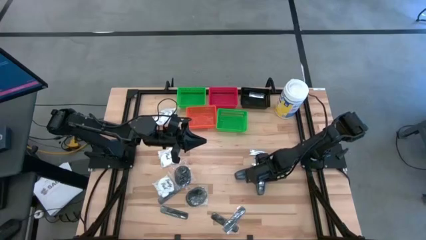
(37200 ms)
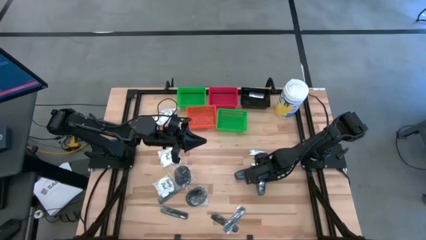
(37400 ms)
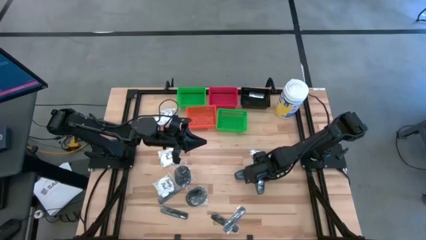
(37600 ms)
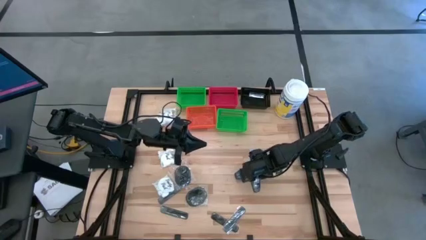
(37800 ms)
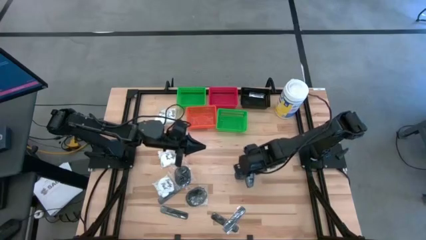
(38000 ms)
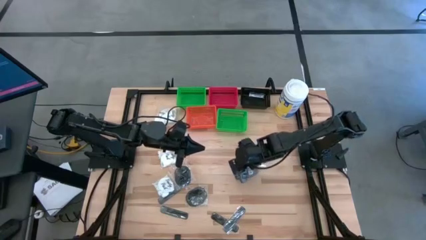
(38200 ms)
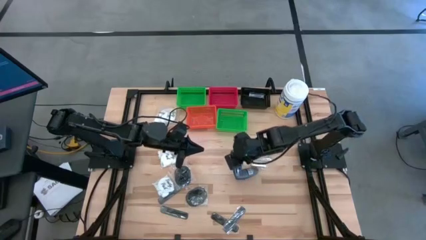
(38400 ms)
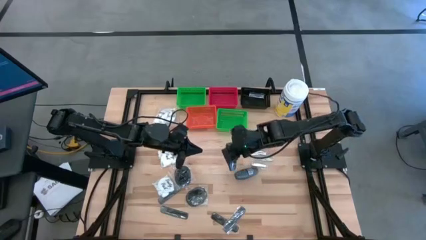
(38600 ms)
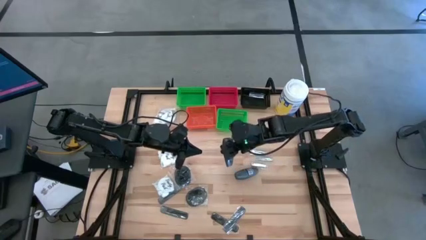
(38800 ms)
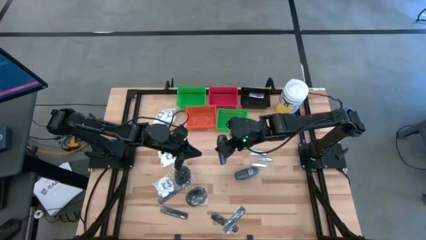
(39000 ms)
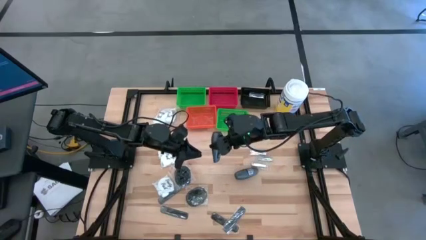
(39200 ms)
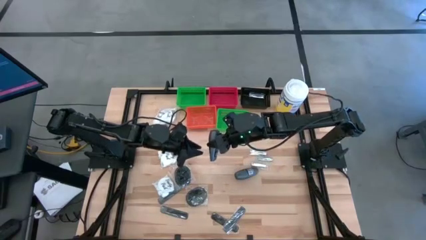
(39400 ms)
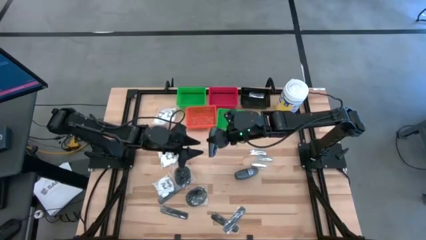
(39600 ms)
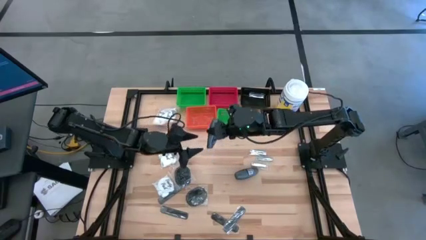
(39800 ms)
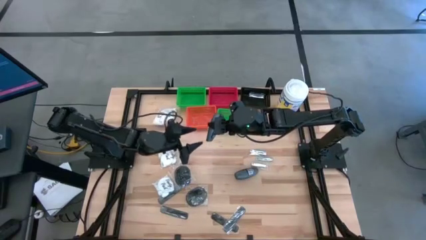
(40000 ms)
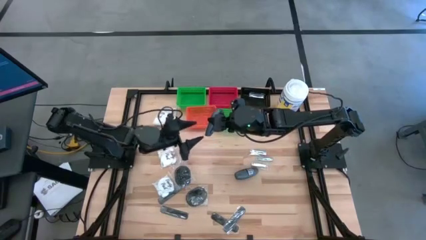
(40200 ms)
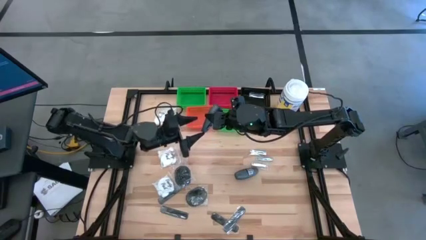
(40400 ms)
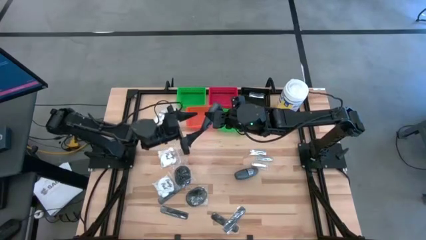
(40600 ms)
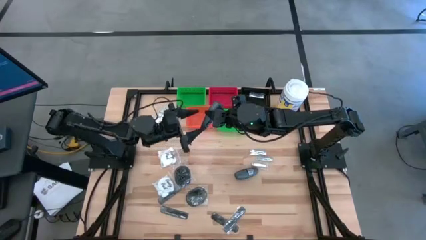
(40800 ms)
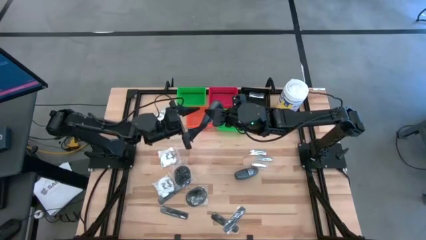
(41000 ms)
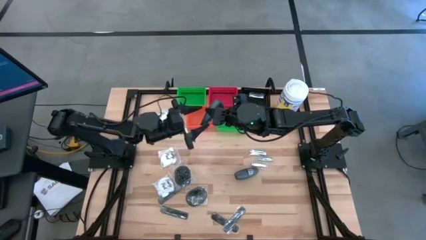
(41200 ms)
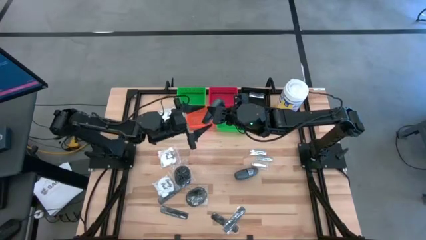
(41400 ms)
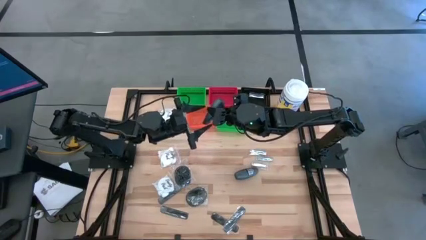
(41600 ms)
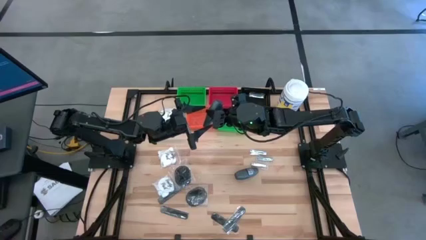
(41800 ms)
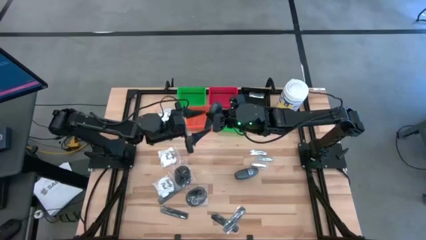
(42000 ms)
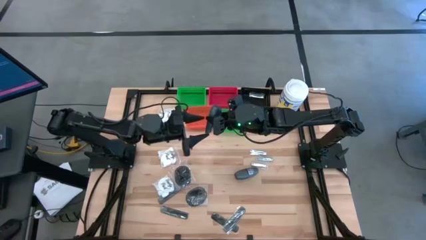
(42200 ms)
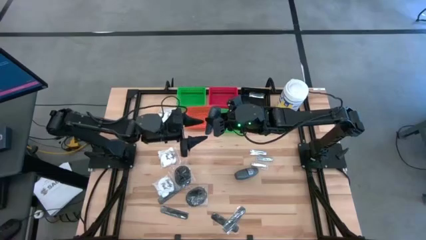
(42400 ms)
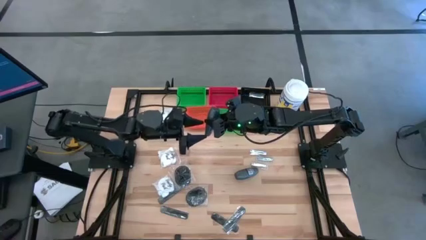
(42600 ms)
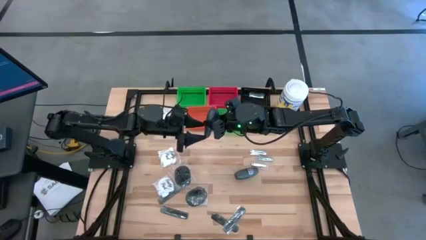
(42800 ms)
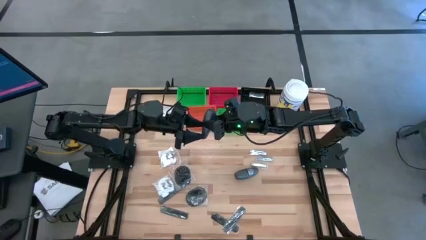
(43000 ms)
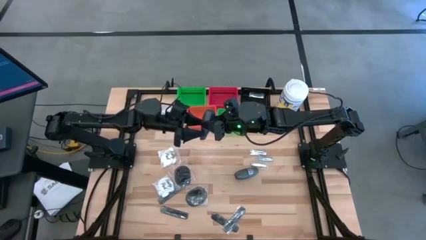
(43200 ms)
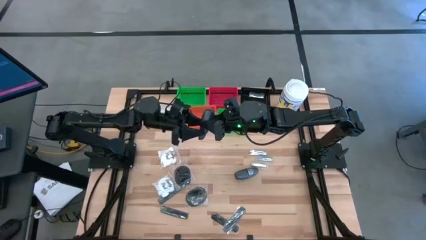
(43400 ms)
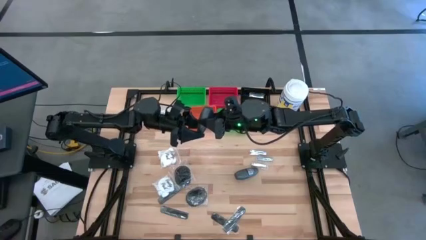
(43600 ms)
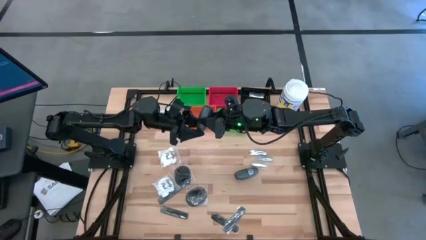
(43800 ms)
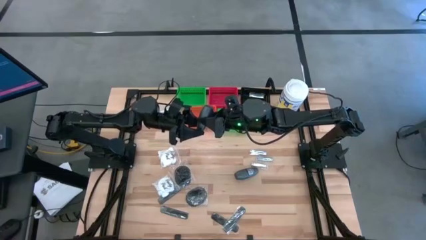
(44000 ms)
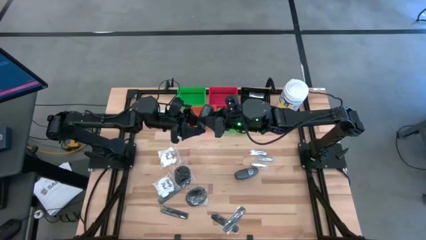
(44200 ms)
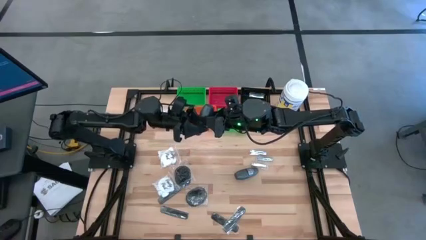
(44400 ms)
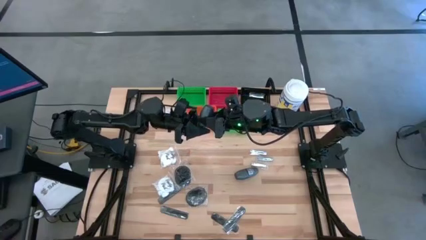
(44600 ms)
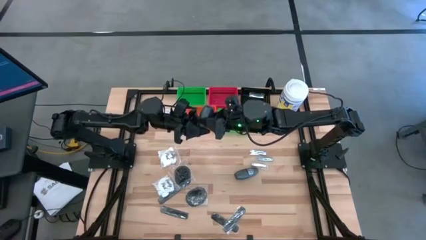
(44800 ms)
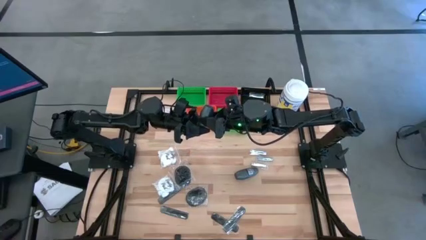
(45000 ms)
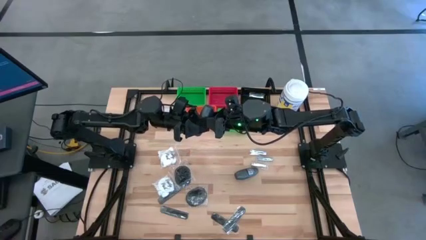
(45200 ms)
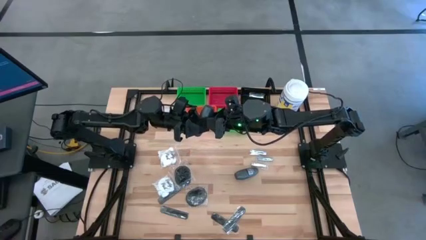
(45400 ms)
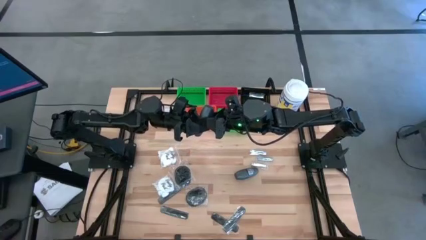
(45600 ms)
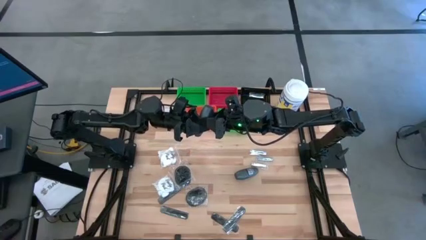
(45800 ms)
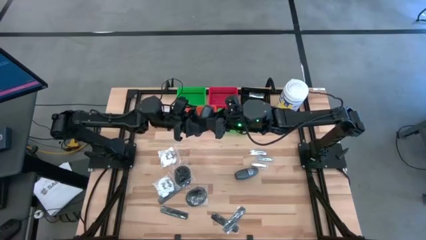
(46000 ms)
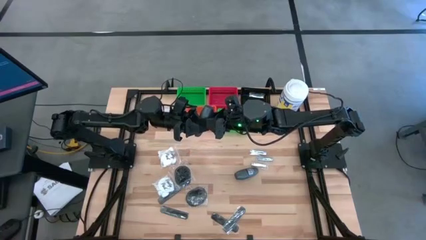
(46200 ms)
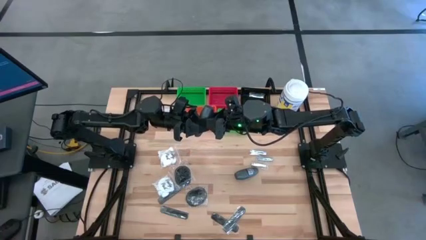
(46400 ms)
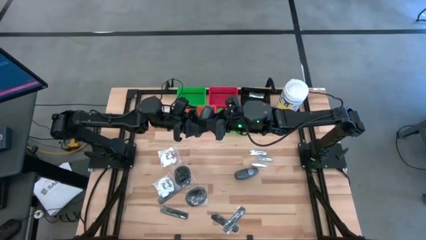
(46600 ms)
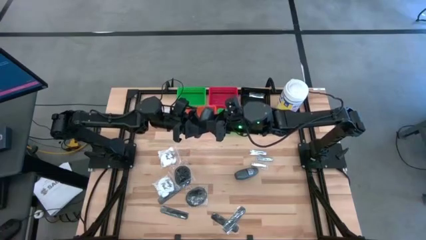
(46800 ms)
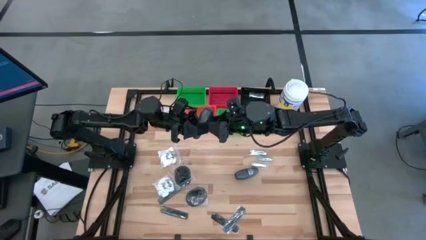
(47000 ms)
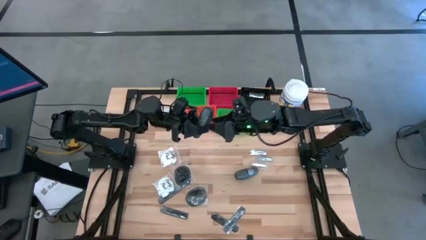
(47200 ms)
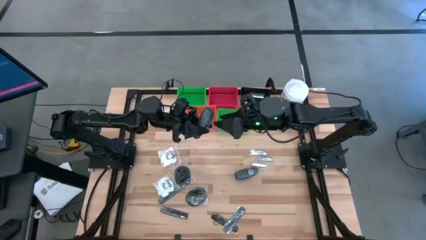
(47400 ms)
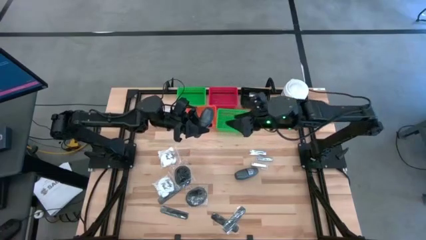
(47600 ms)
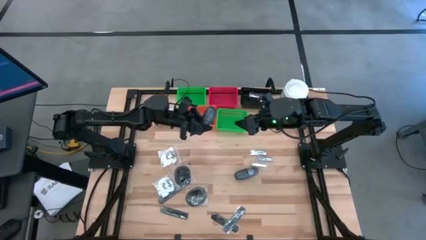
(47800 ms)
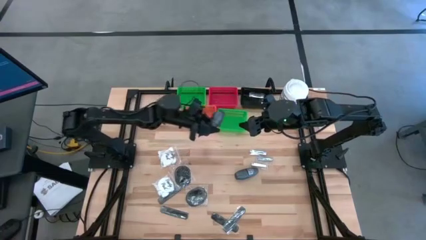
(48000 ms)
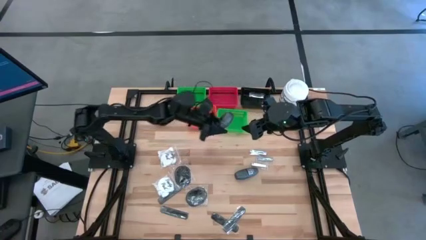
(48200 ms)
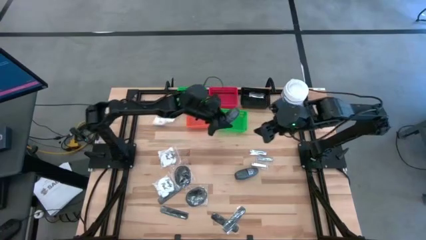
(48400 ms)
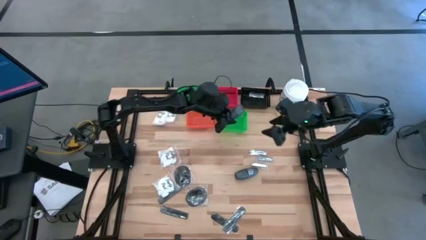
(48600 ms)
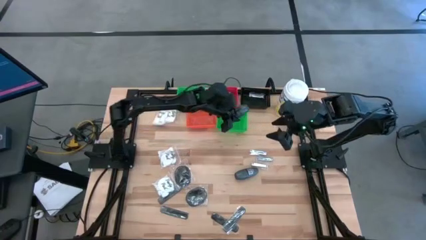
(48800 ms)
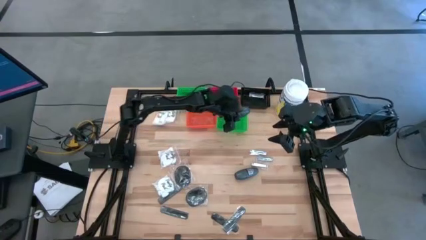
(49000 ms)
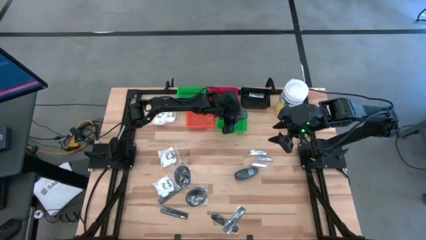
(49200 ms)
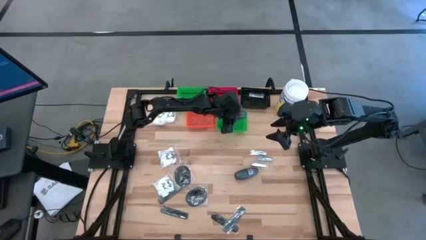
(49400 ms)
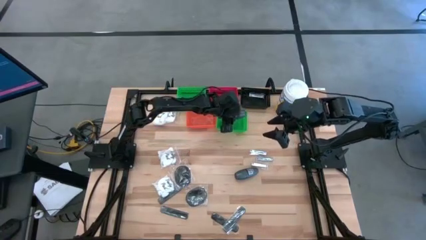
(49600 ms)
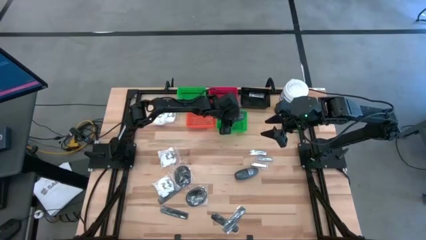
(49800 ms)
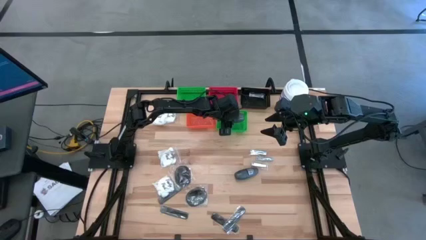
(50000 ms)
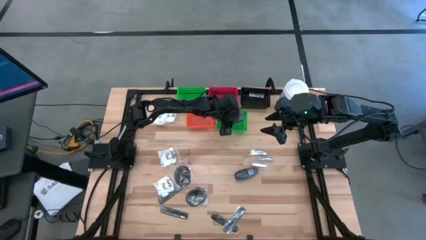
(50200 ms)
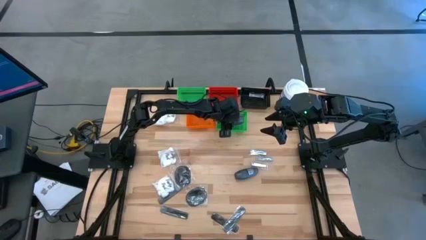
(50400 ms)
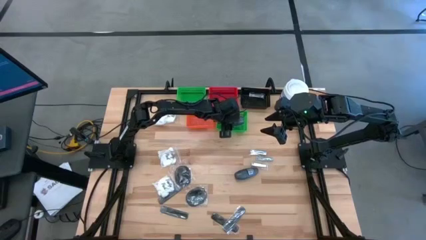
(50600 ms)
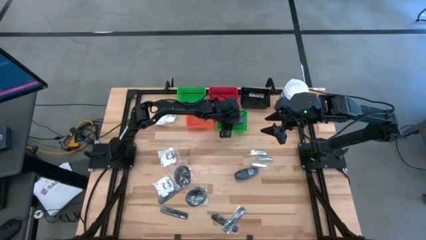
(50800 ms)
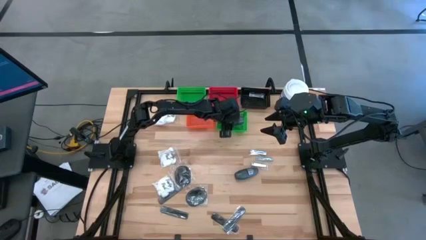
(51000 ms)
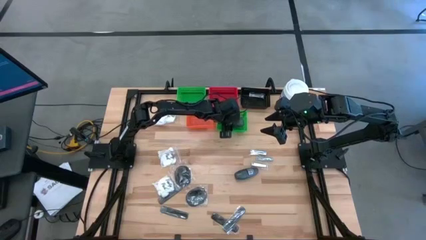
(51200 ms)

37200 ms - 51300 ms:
Task: Pick & Place Travel size toiletries
Put the black deodorant into the green bin

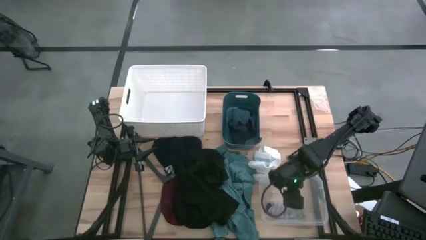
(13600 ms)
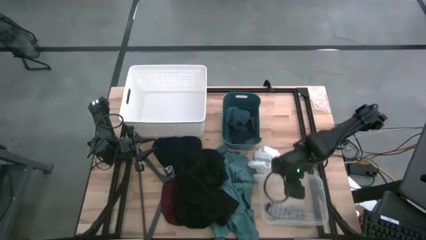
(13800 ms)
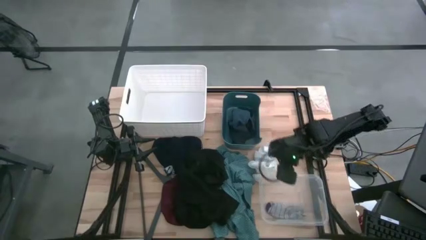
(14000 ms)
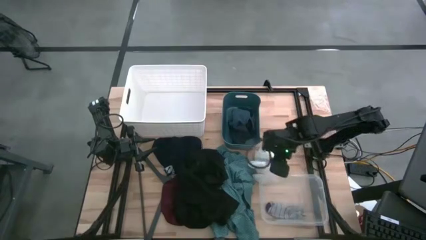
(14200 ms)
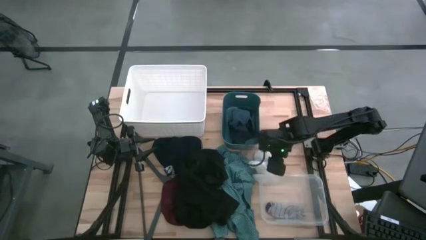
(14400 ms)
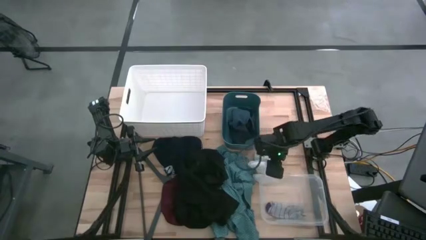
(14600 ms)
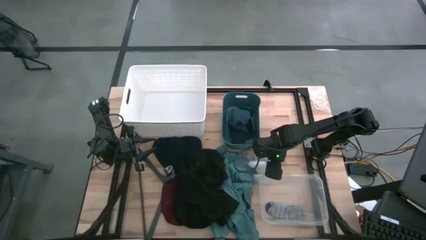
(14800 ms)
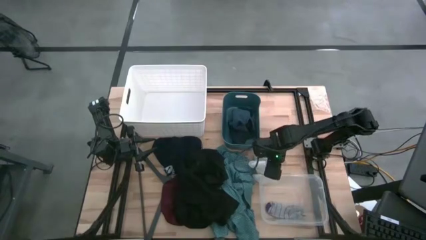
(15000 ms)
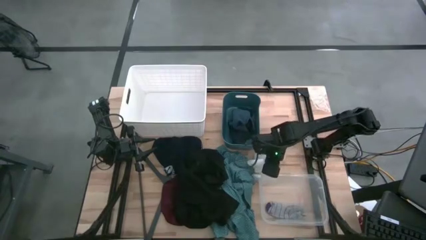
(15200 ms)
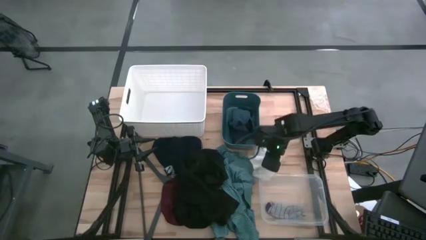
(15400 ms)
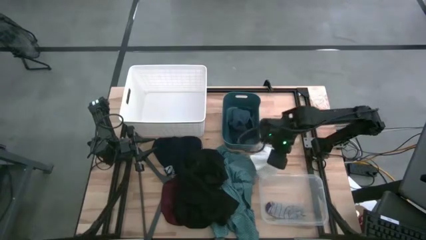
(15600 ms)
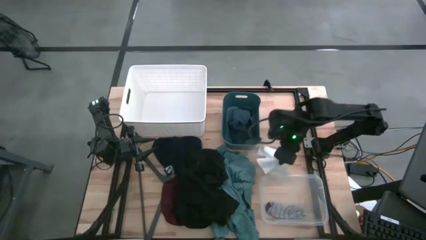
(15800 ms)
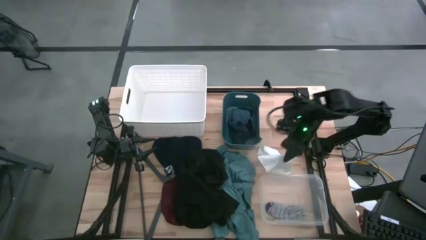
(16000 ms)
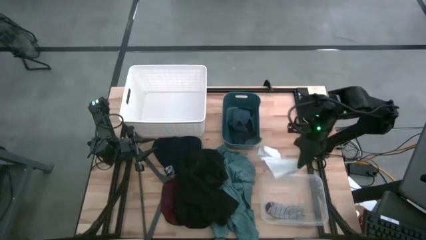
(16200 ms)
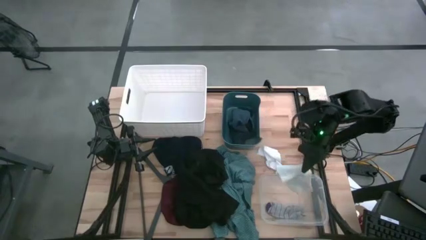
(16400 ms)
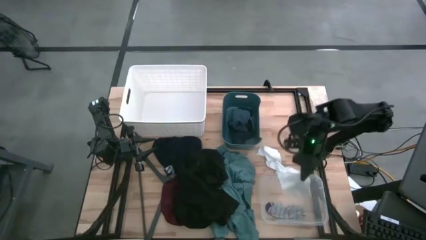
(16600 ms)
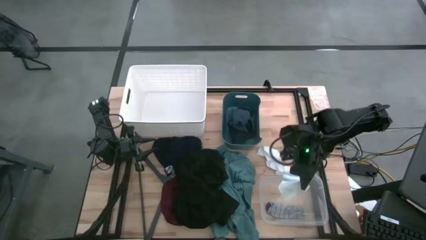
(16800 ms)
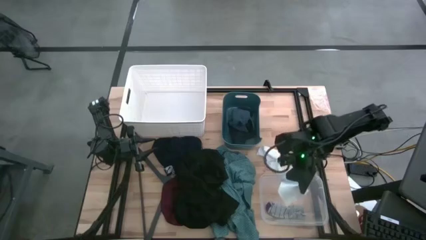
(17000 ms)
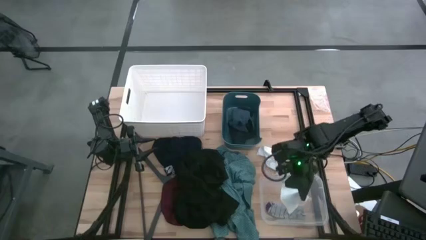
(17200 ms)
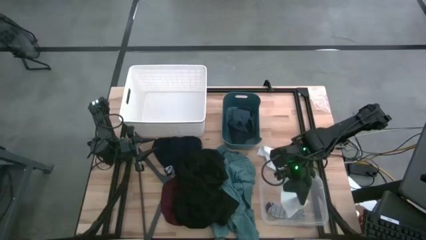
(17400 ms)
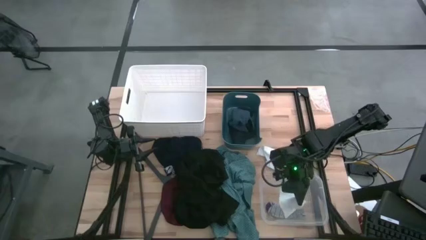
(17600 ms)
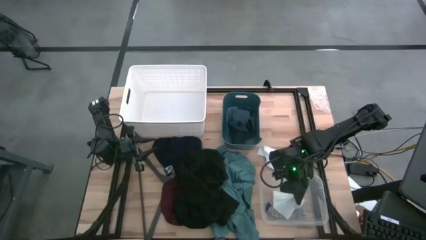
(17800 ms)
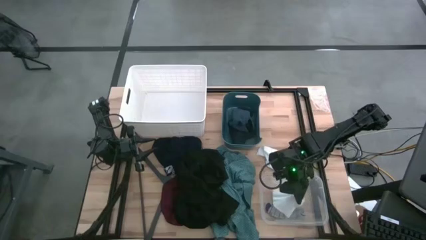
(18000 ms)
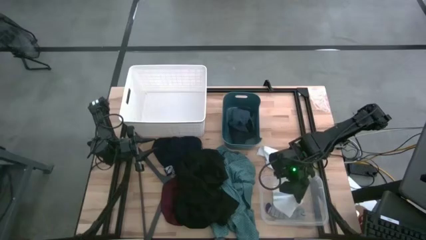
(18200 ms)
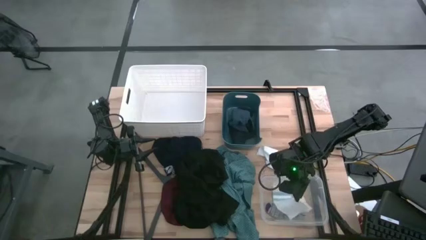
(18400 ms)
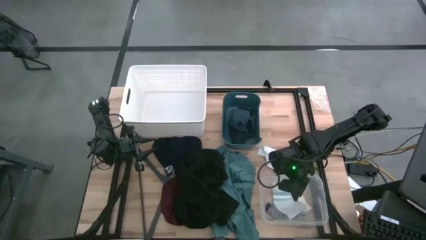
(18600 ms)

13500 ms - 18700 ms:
Task: Pick & Place Cloths
Put the white socks into the transparent bin
